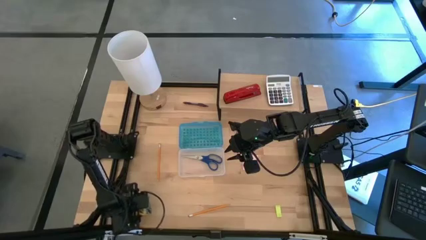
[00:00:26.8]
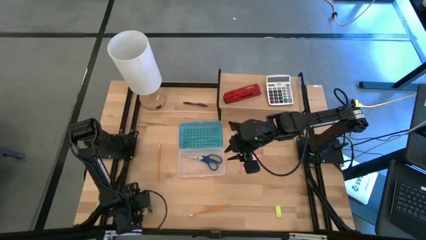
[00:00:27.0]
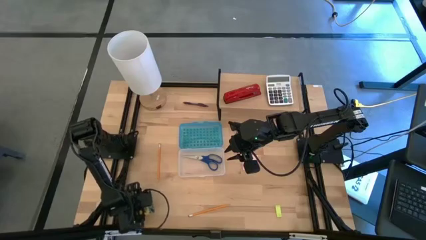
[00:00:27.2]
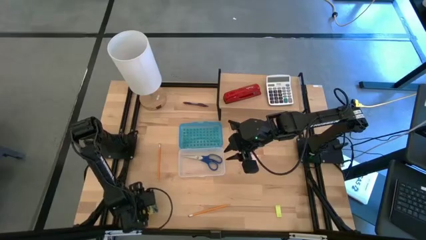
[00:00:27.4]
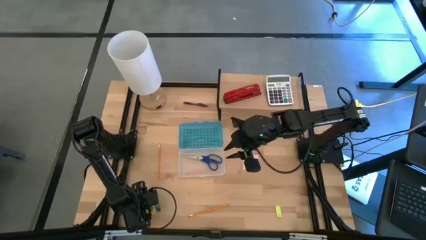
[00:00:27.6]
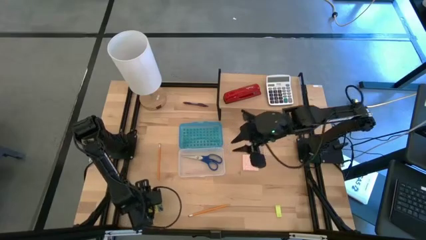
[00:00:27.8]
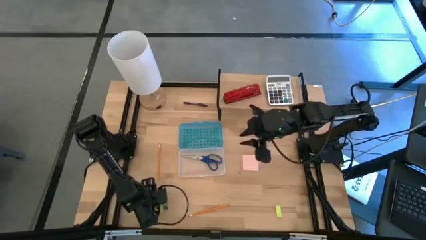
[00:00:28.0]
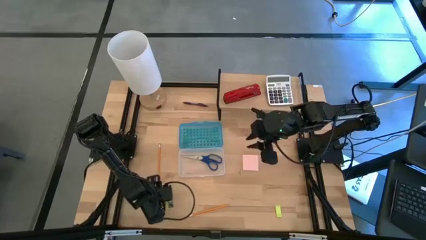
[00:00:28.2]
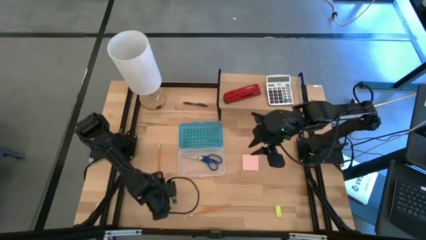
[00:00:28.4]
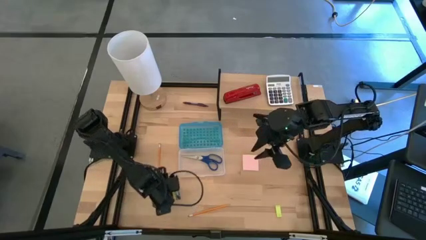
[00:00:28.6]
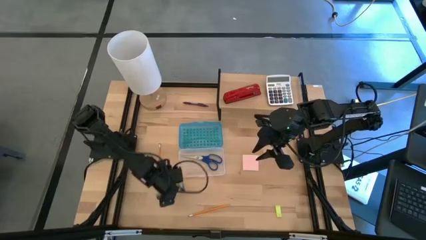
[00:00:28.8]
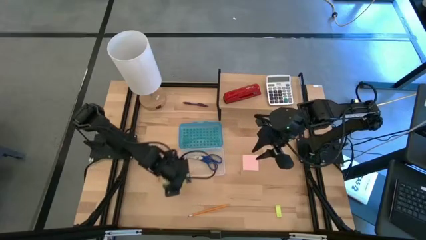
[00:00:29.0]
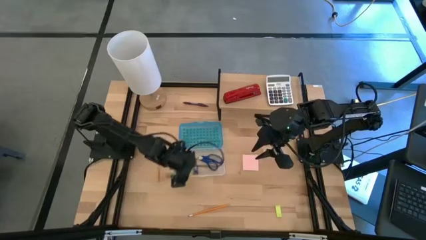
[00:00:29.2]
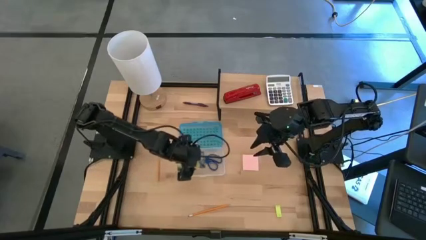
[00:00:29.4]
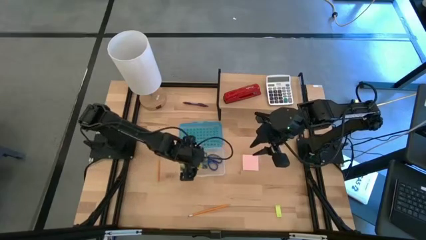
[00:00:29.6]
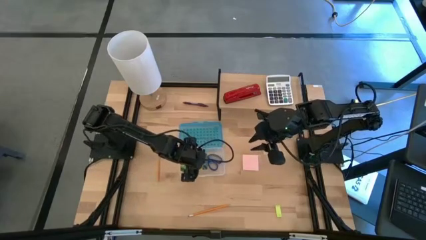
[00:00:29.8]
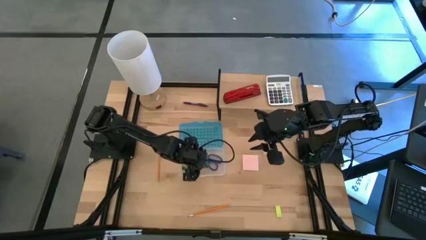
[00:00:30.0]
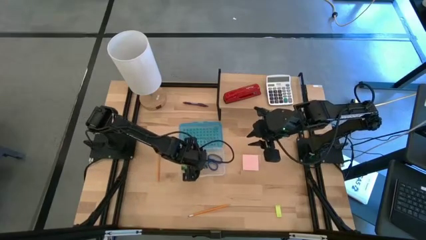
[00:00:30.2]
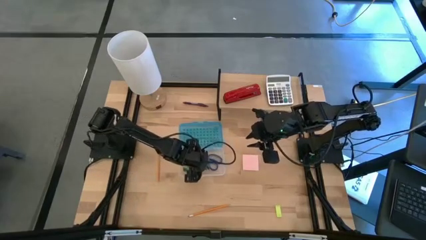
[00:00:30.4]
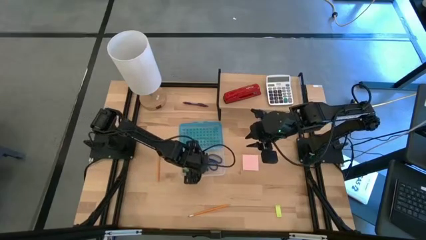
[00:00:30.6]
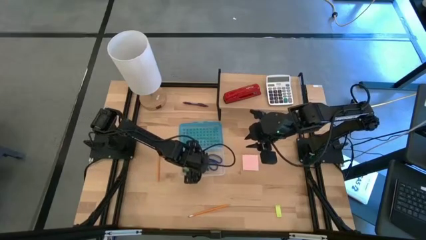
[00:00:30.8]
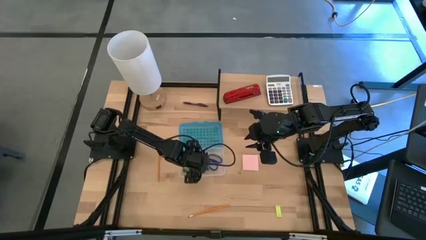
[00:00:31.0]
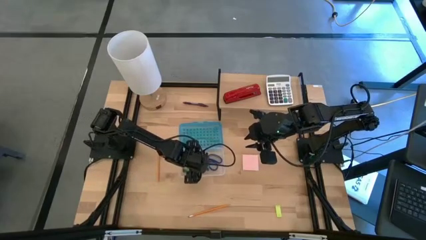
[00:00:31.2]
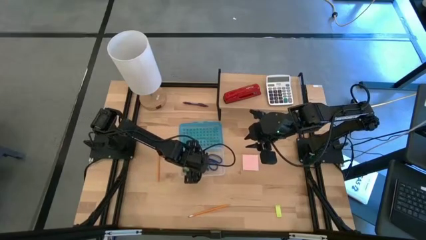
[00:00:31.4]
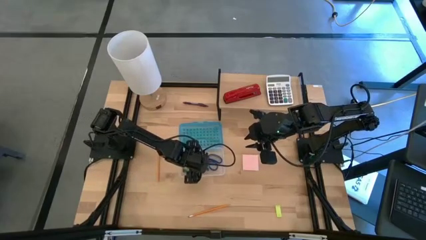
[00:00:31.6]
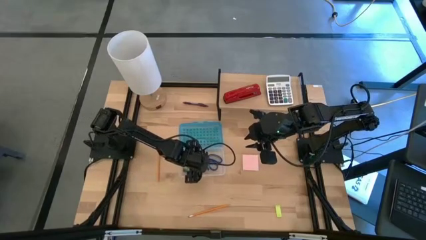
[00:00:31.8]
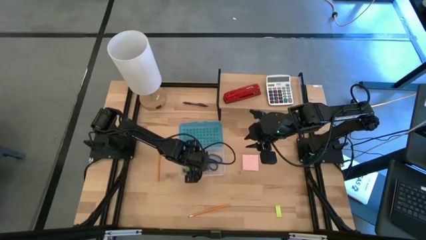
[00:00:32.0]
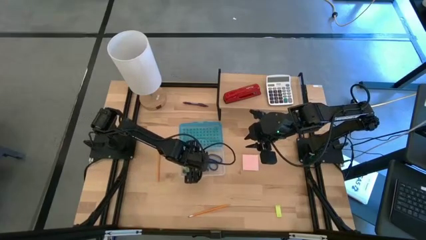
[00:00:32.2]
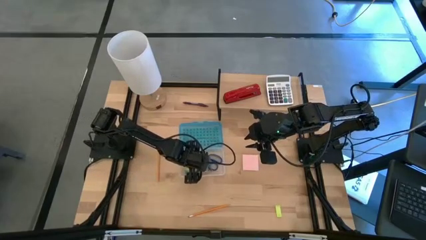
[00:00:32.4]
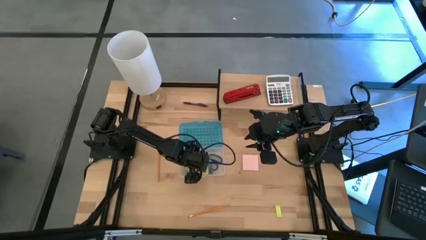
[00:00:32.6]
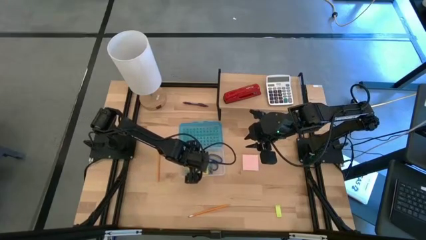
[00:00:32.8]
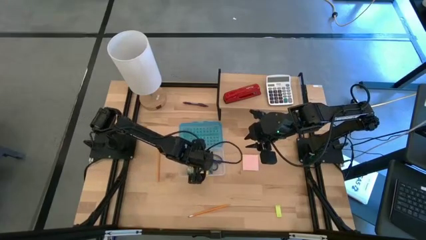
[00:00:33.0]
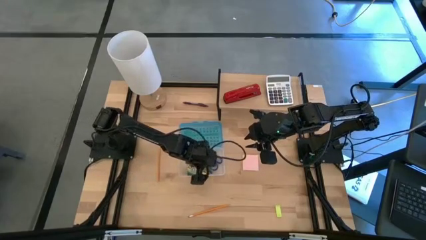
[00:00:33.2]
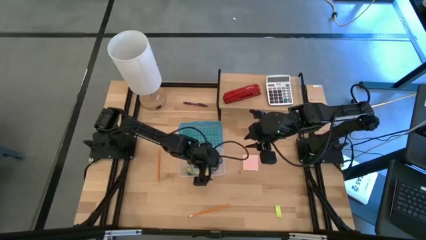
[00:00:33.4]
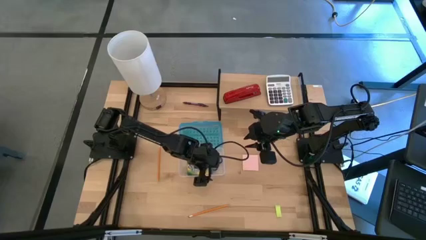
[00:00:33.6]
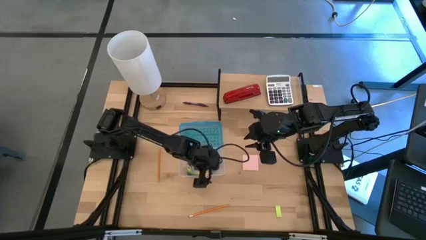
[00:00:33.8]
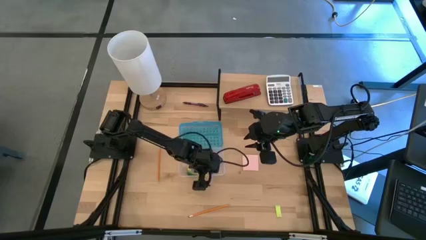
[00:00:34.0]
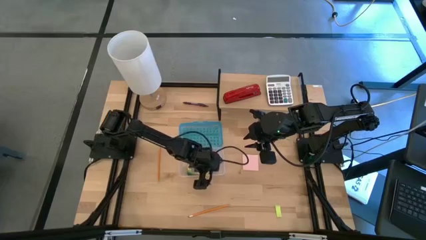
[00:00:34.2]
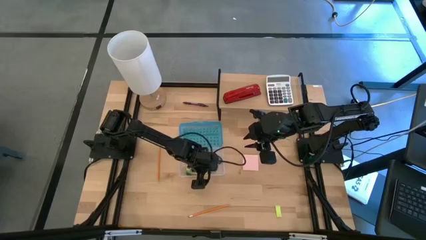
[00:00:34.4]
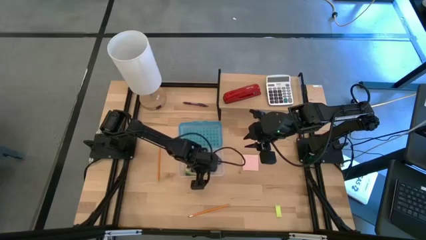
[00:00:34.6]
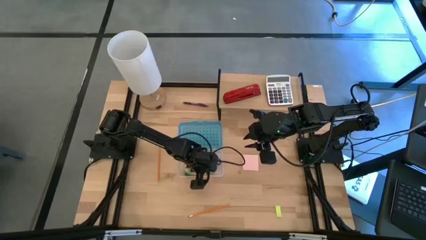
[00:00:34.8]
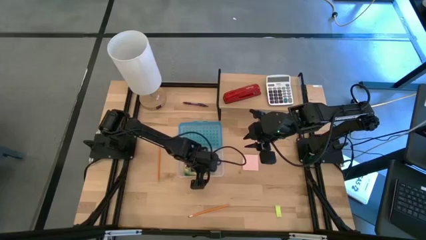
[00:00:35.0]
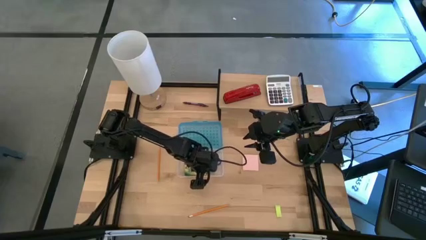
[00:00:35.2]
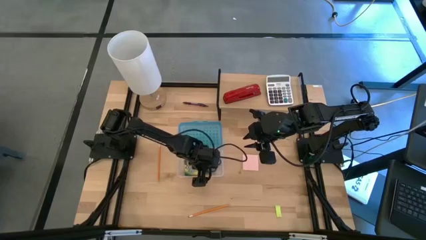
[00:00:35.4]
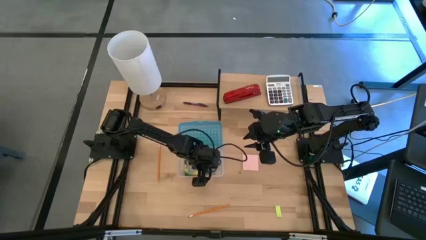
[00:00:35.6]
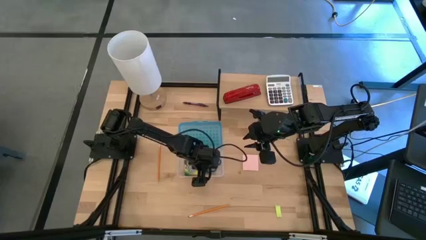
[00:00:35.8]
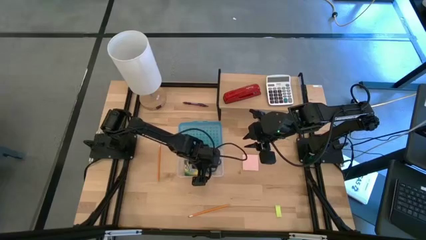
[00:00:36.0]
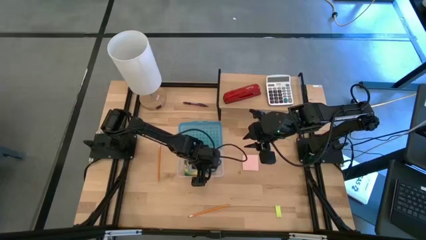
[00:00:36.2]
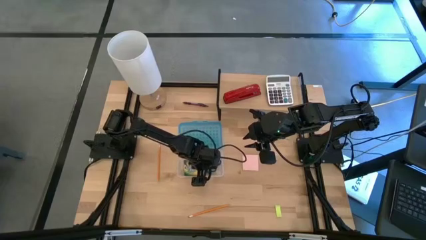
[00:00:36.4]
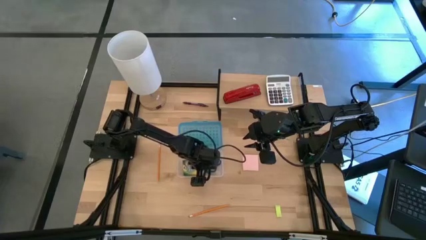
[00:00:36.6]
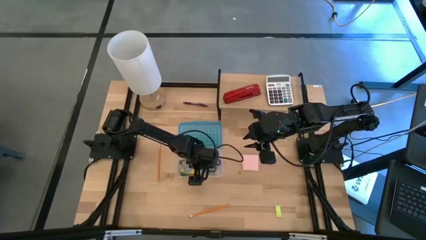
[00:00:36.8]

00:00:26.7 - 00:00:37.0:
Task: Pack school essentials
Put the yellow crayons box into the blue supply box
